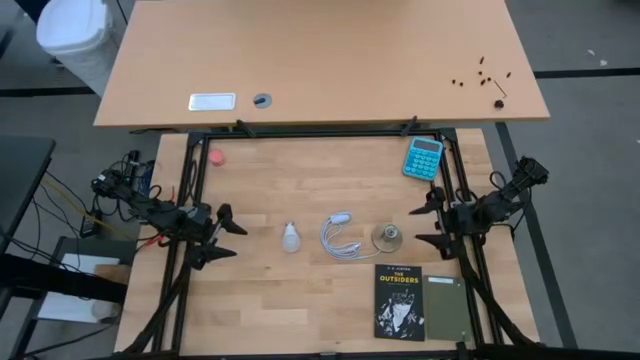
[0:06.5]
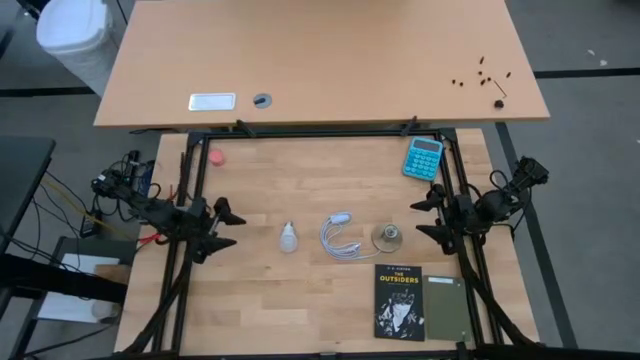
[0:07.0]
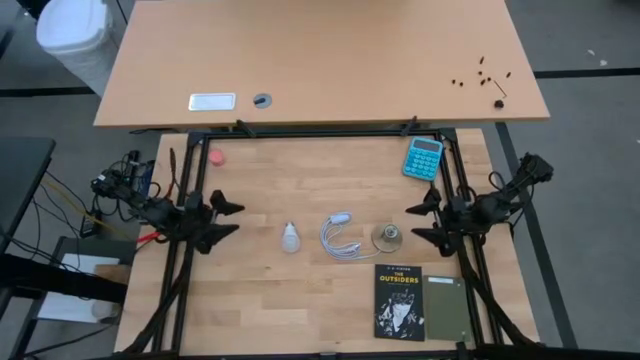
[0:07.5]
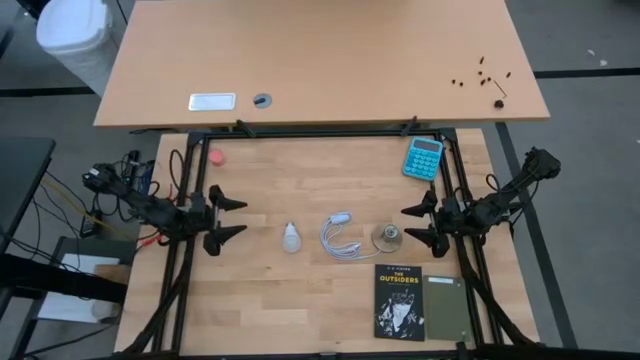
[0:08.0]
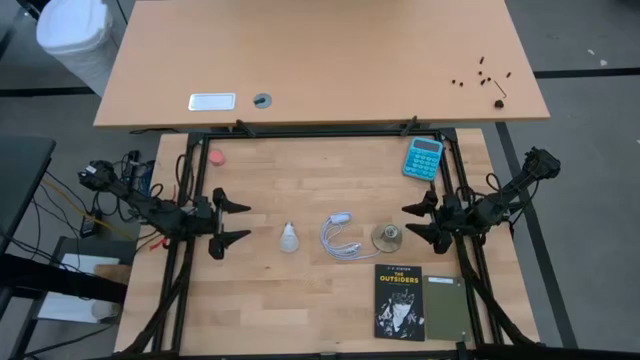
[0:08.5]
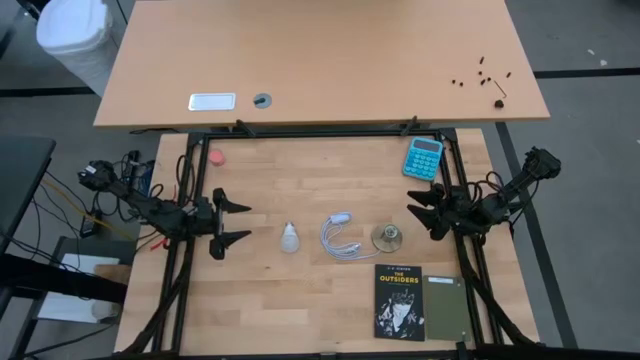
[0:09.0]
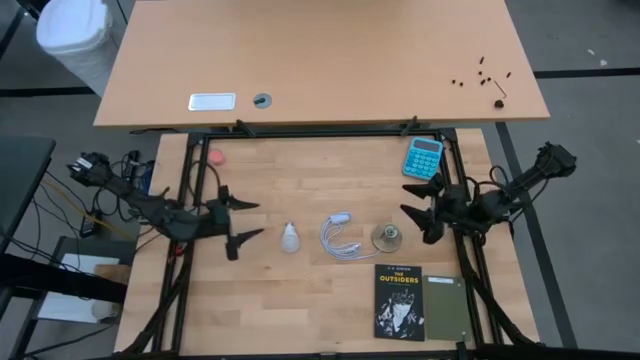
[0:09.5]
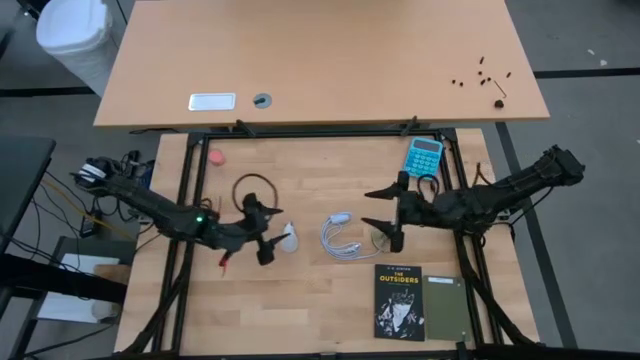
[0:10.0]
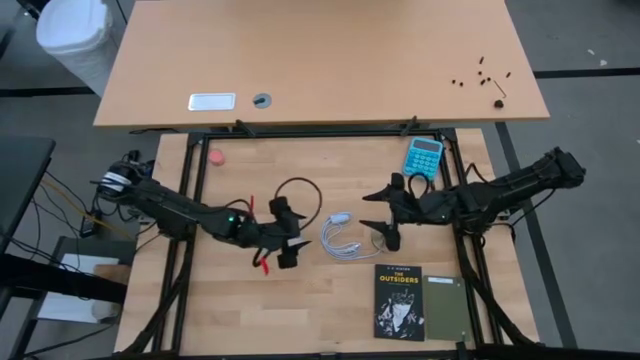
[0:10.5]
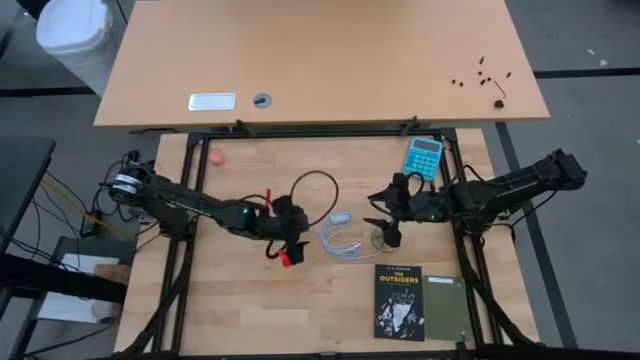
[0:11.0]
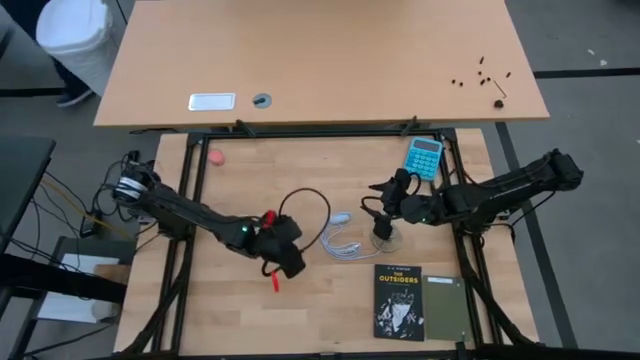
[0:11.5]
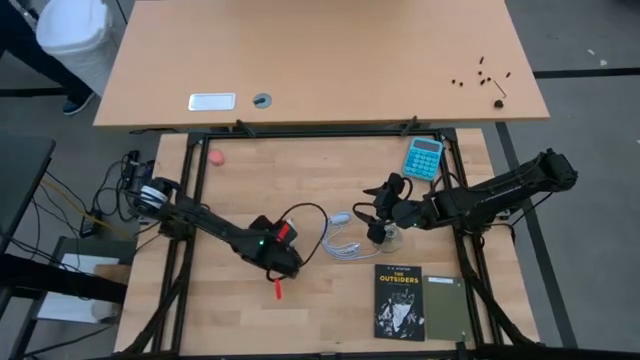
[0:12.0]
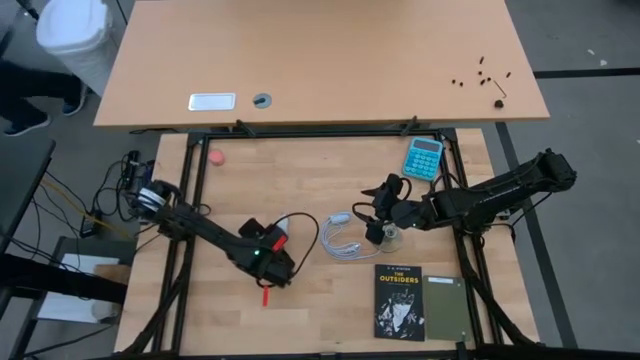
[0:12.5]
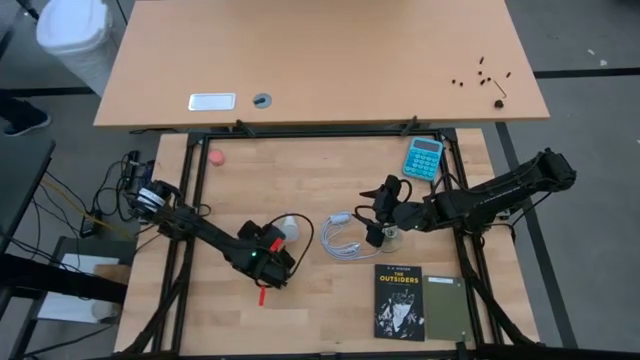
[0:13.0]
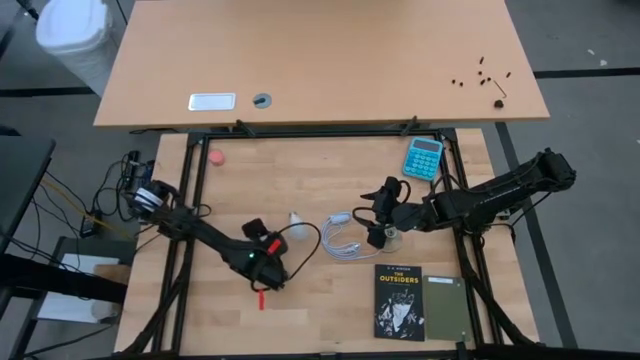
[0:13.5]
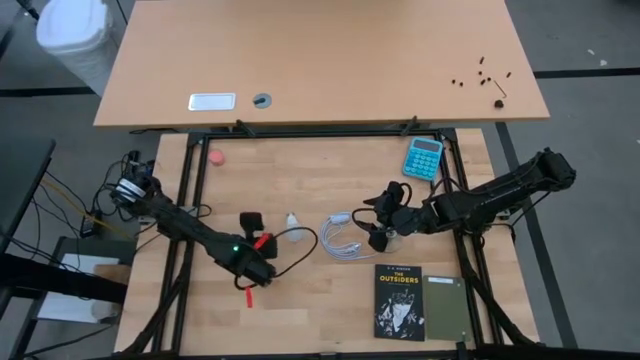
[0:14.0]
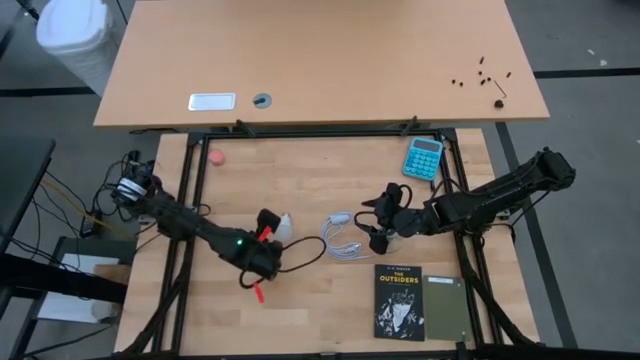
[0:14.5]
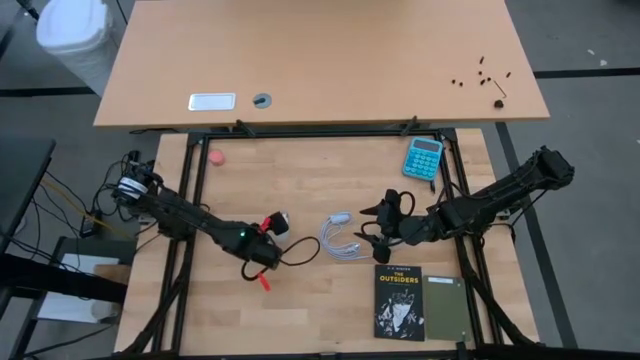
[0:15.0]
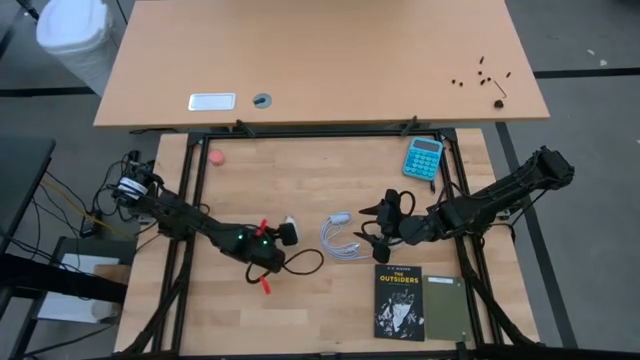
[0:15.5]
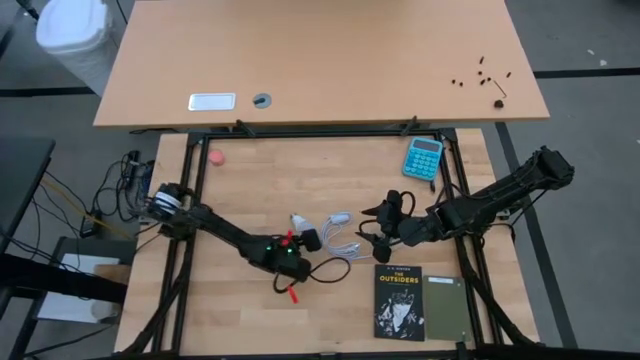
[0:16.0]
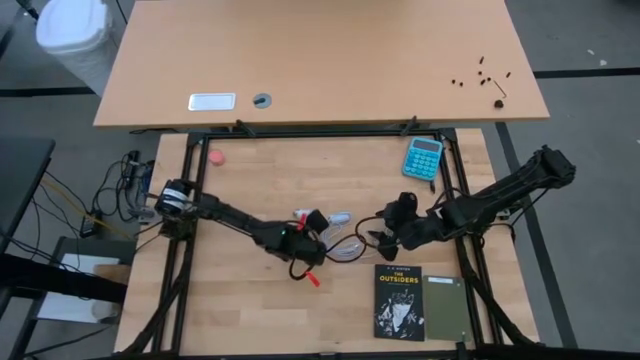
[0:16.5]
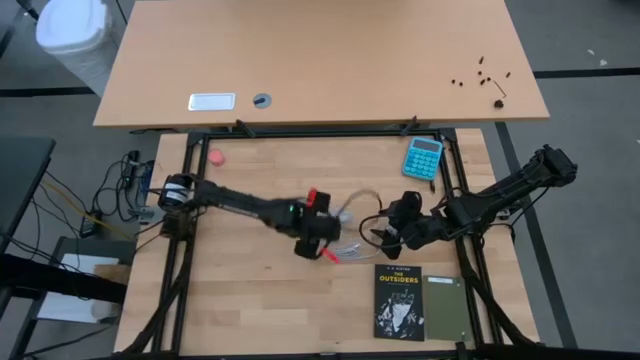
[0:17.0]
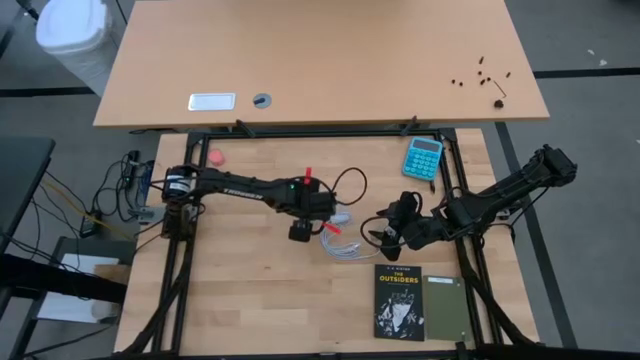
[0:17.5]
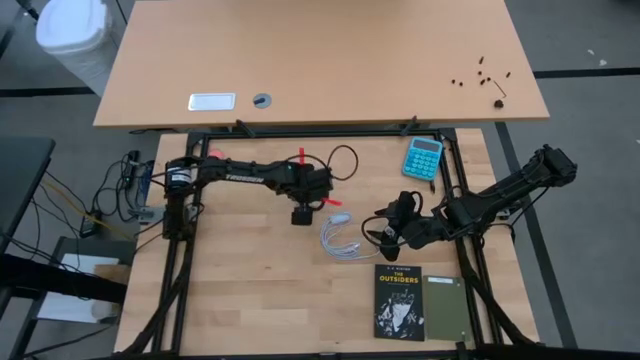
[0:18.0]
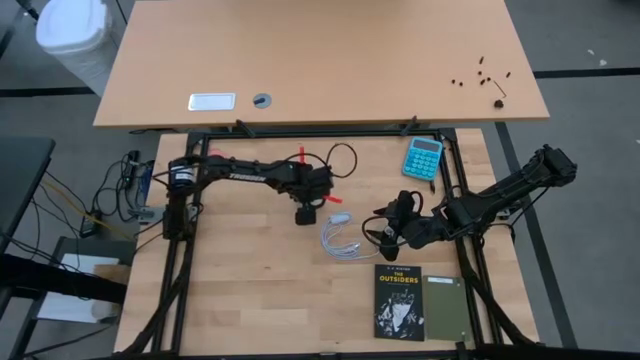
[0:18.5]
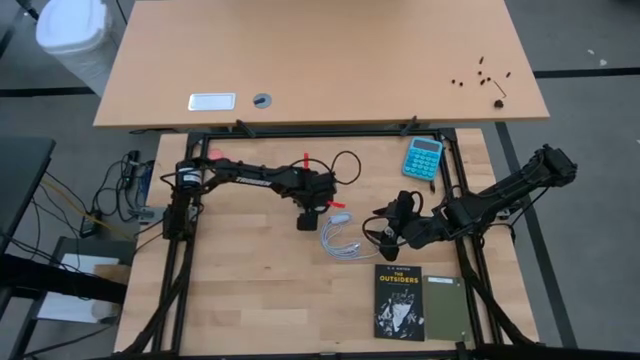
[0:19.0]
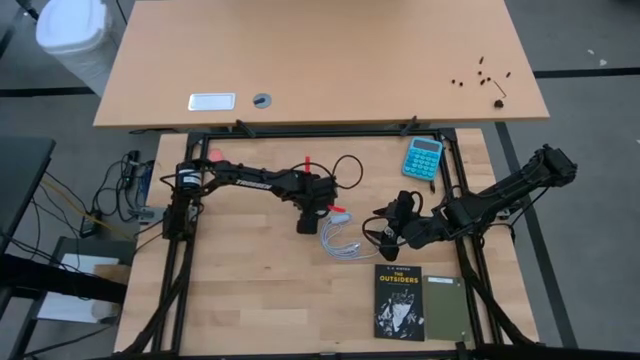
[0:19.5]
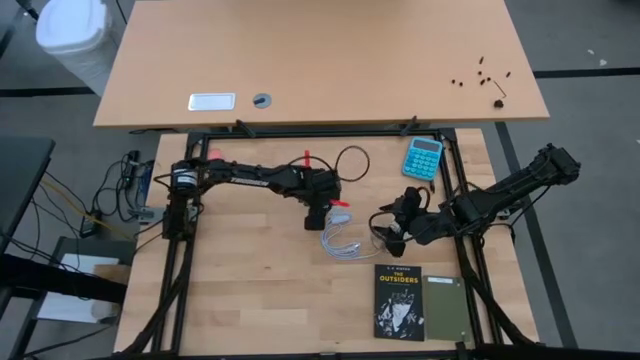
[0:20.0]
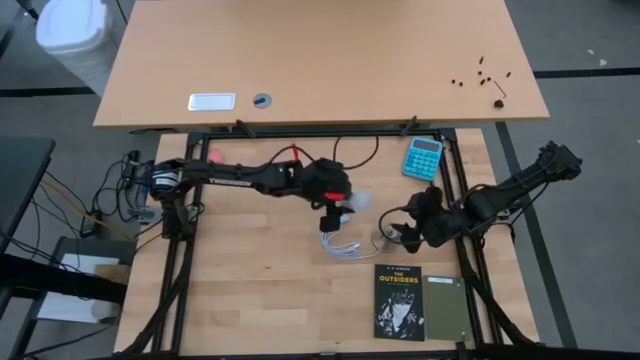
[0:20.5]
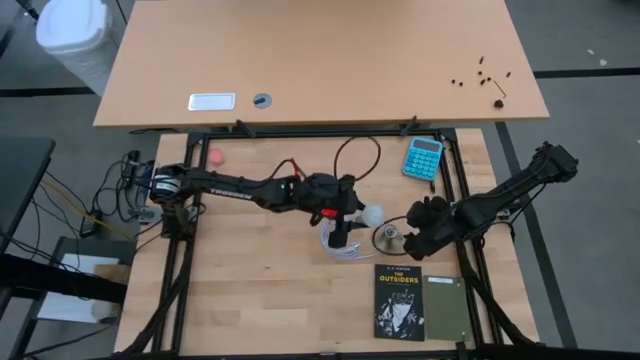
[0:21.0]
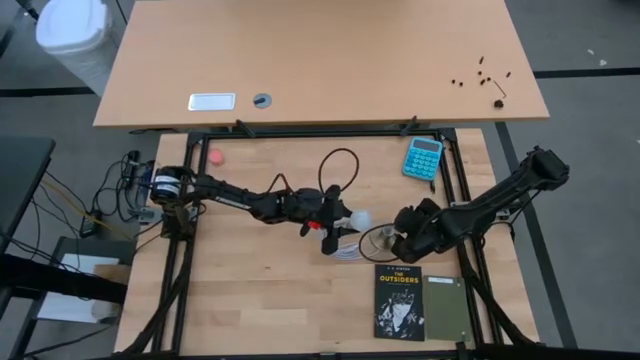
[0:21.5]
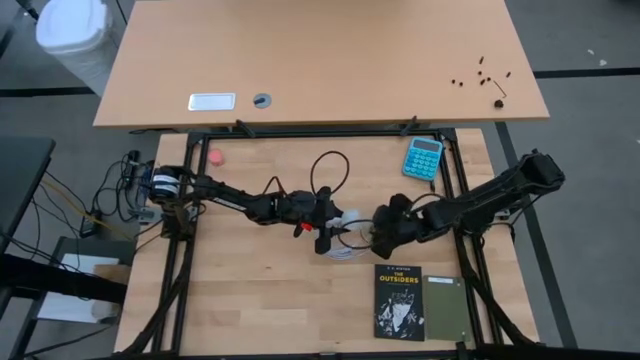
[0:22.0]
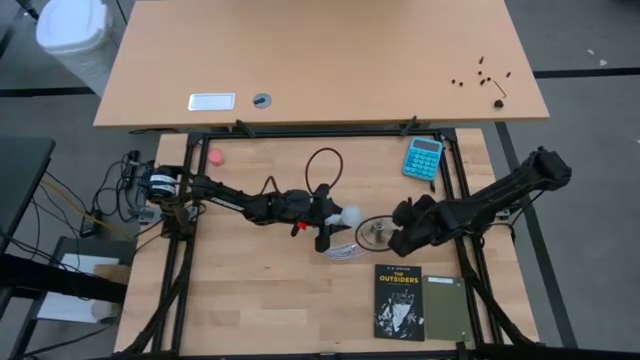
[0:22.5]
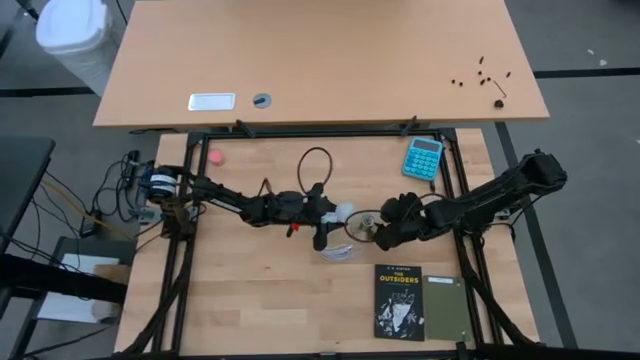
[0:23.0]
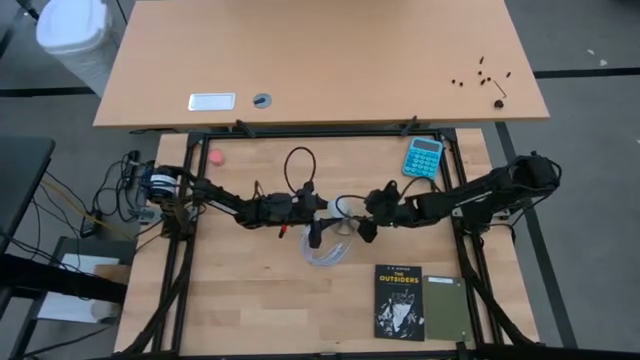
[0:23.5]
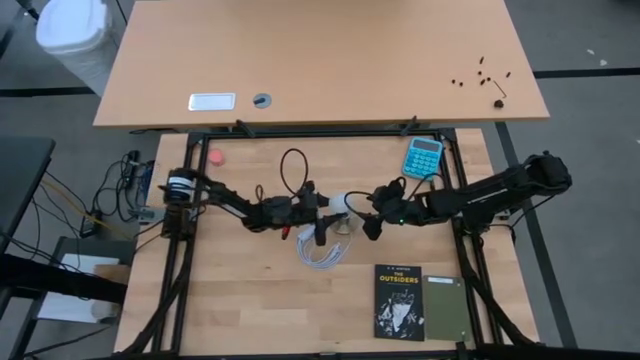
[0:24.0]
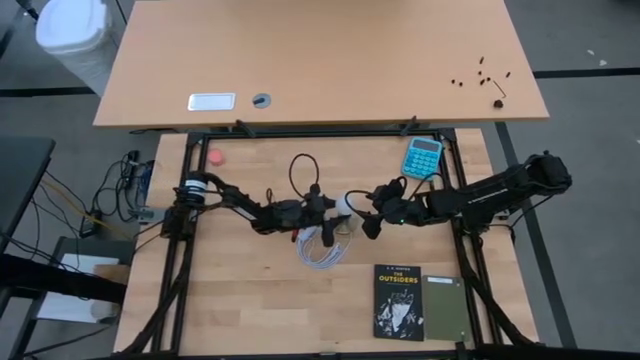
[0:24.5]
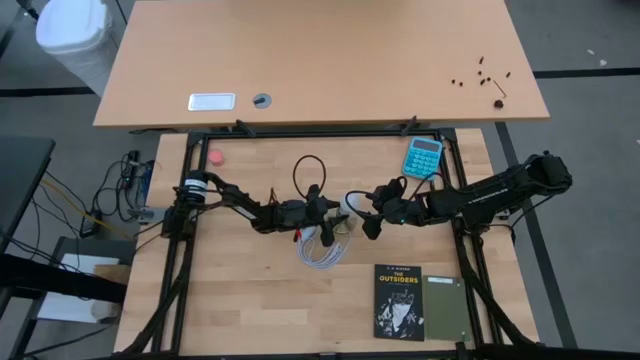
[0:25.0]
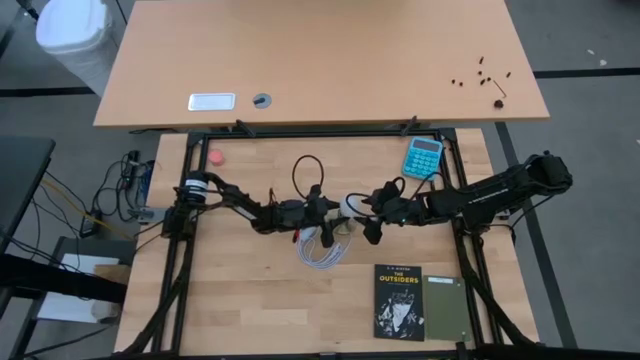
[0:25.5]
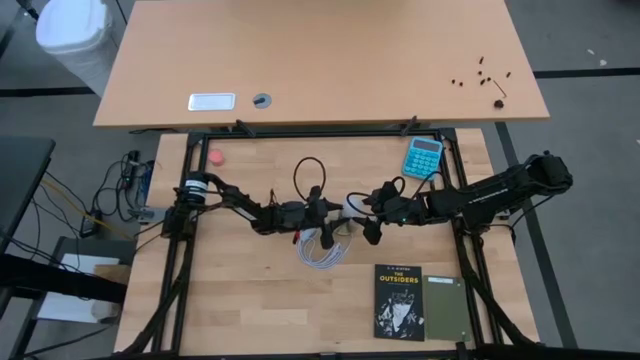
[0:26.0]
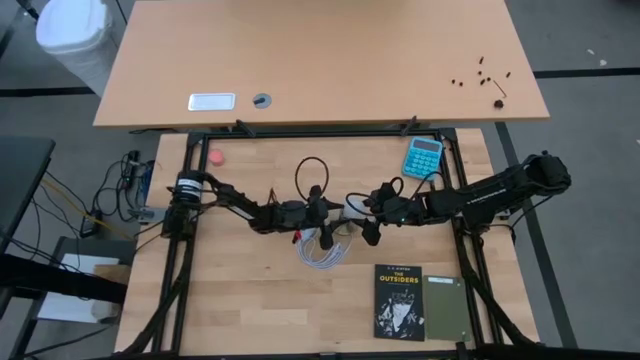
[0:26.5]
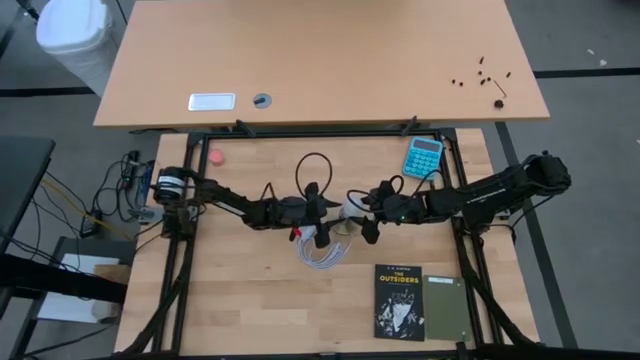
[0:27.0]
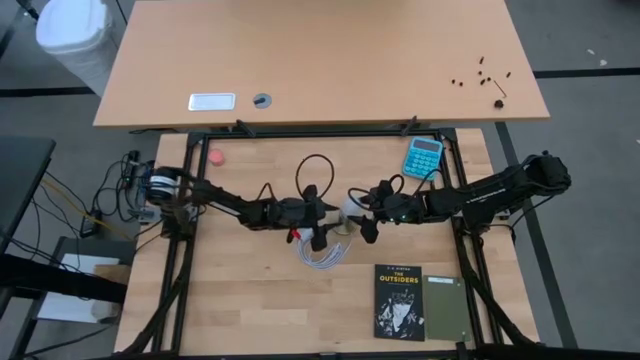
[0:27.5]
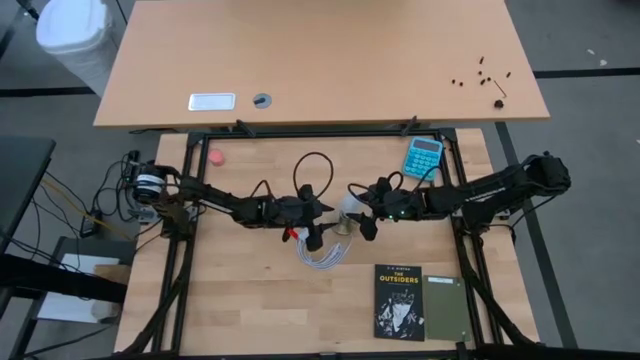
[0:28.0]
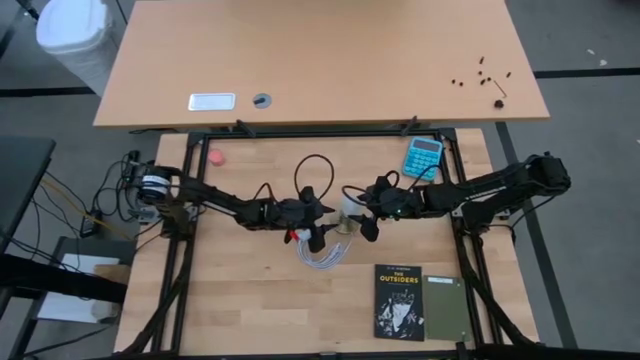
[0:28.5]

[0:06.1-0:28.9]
Task: Screw lightbulb
Insert the white lightbulb into the silver lamp
